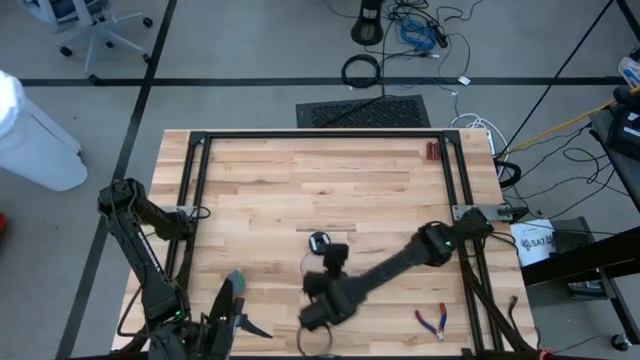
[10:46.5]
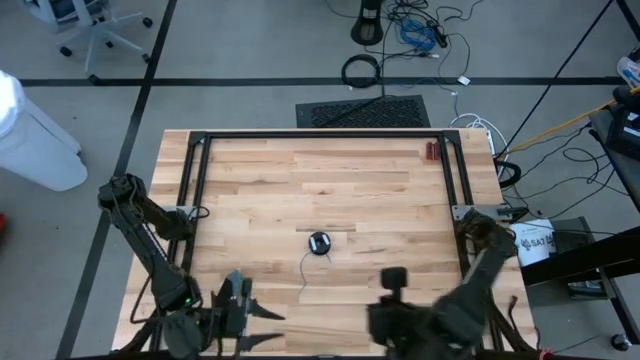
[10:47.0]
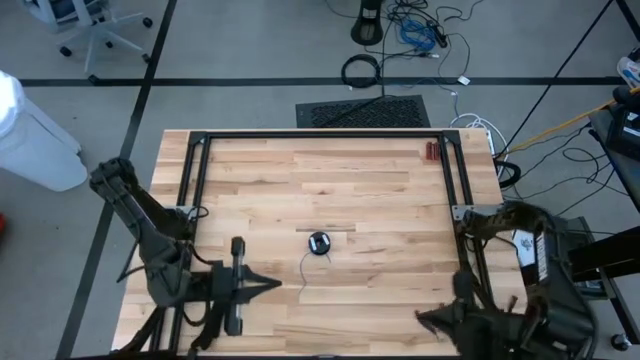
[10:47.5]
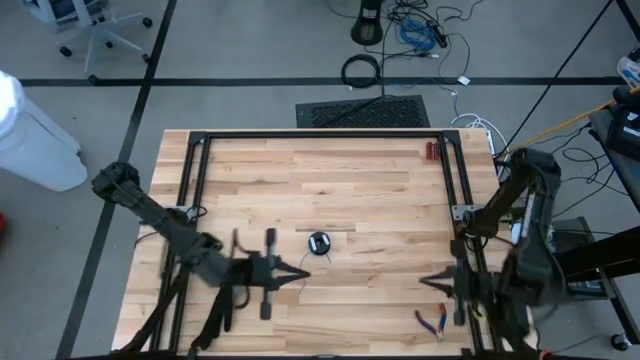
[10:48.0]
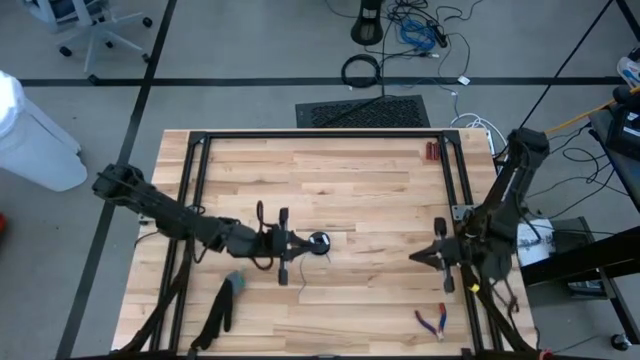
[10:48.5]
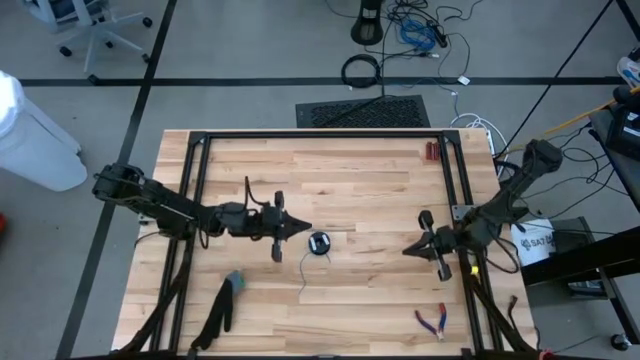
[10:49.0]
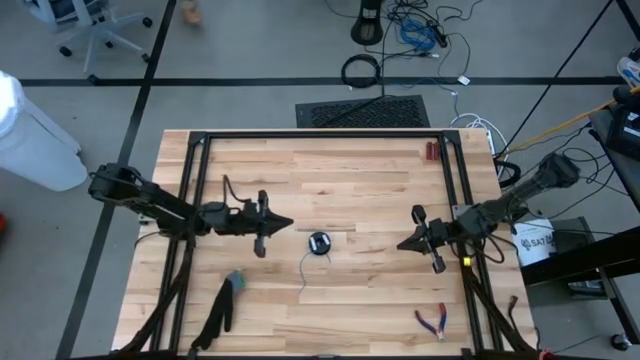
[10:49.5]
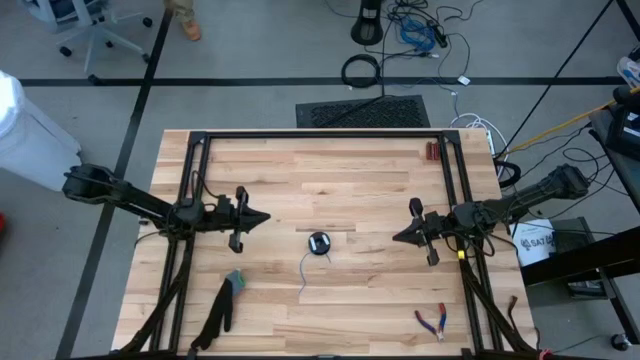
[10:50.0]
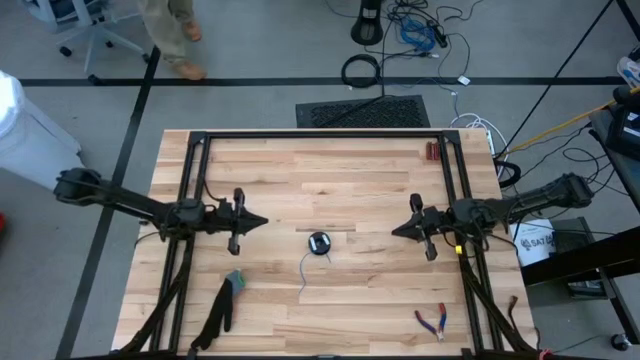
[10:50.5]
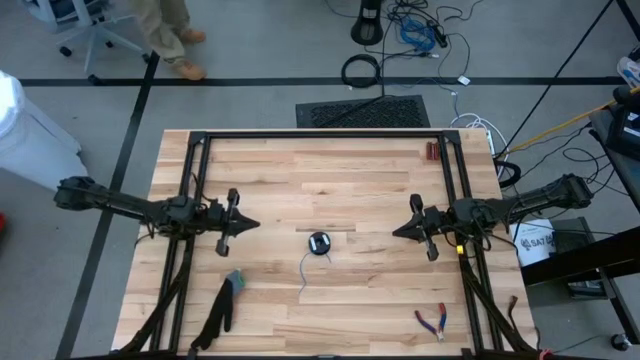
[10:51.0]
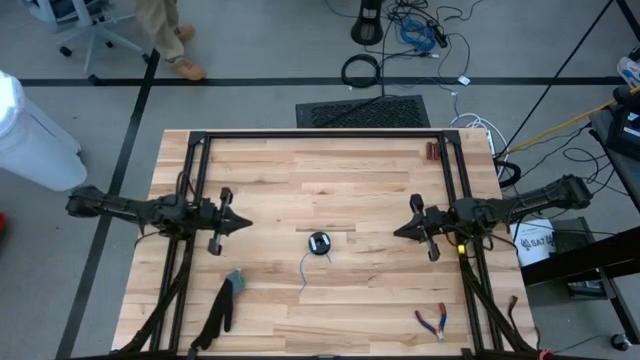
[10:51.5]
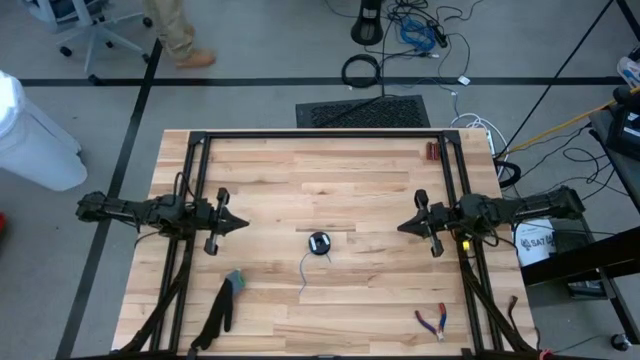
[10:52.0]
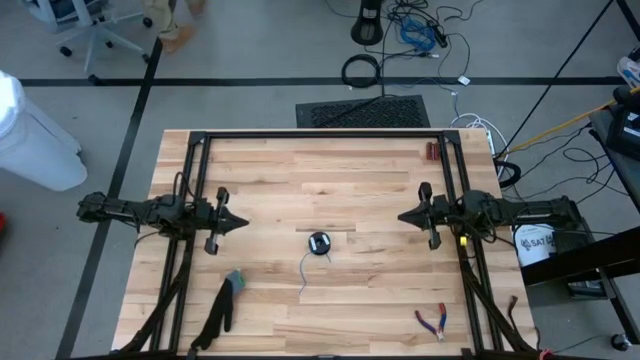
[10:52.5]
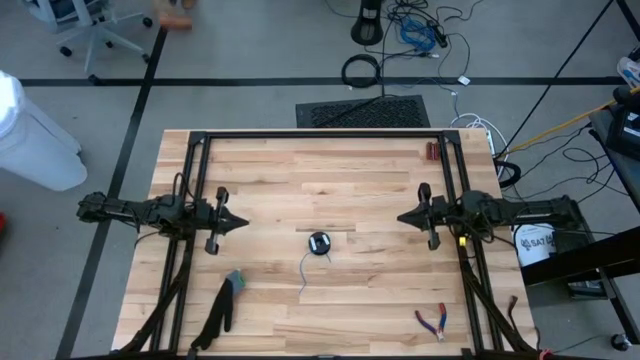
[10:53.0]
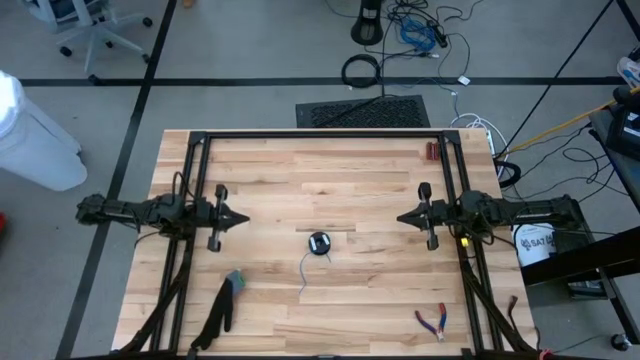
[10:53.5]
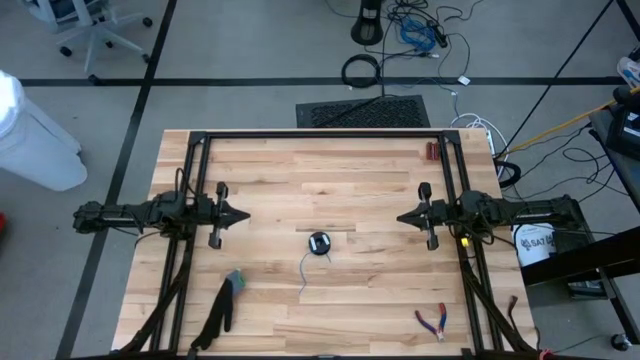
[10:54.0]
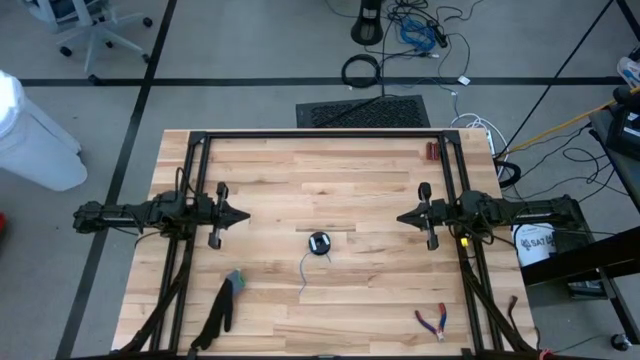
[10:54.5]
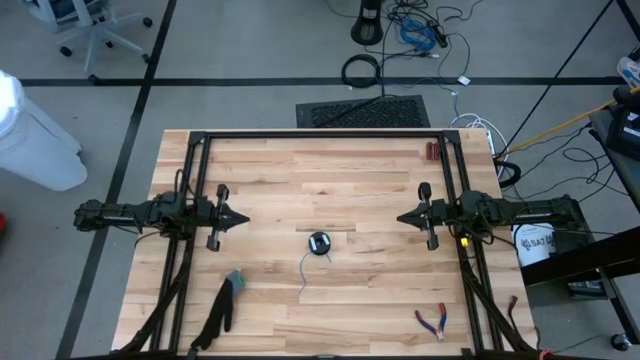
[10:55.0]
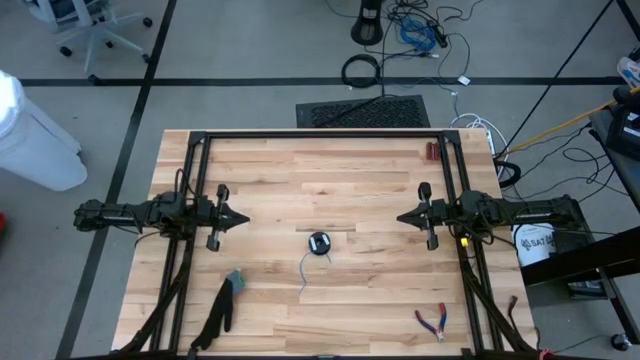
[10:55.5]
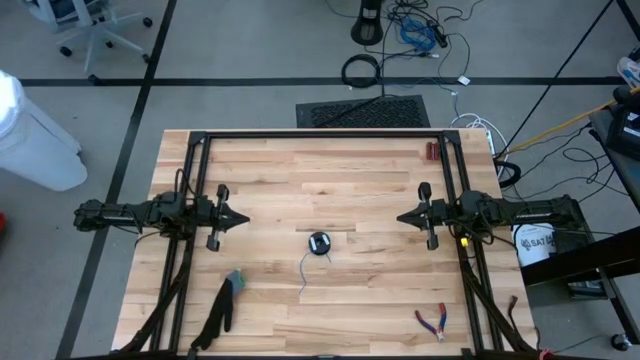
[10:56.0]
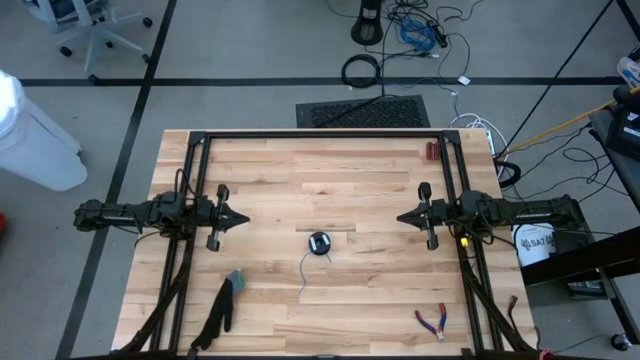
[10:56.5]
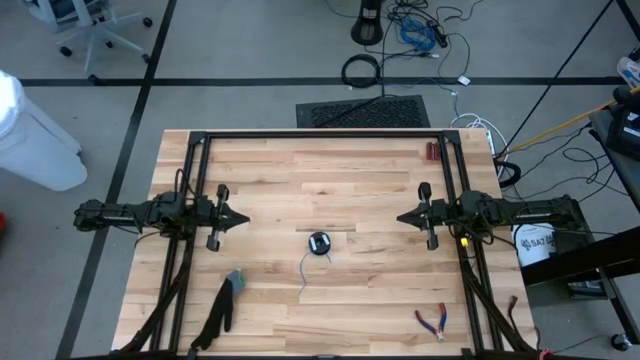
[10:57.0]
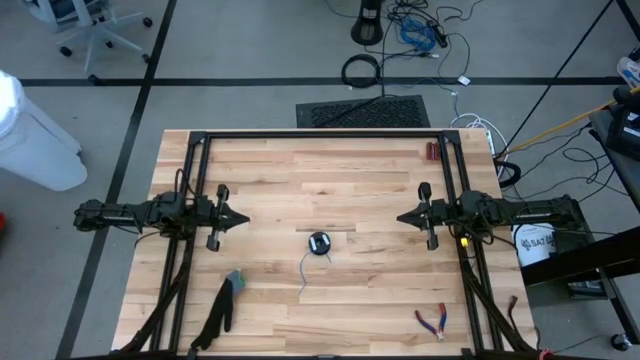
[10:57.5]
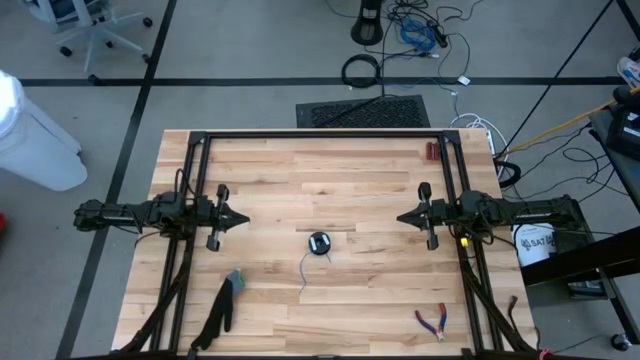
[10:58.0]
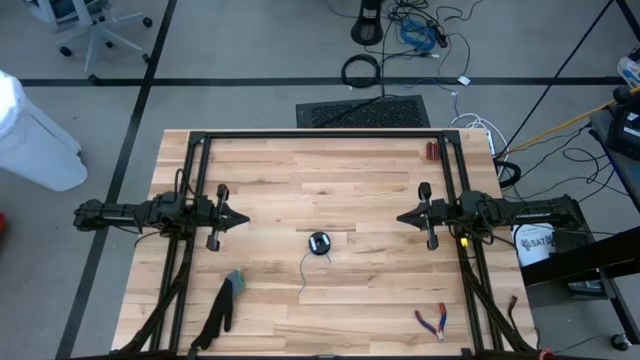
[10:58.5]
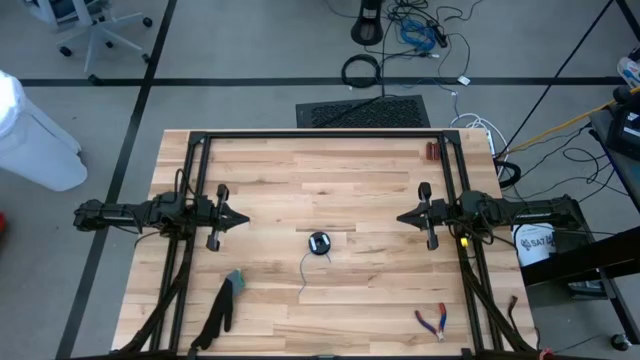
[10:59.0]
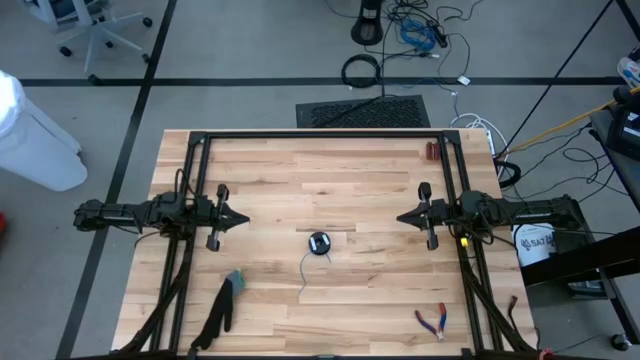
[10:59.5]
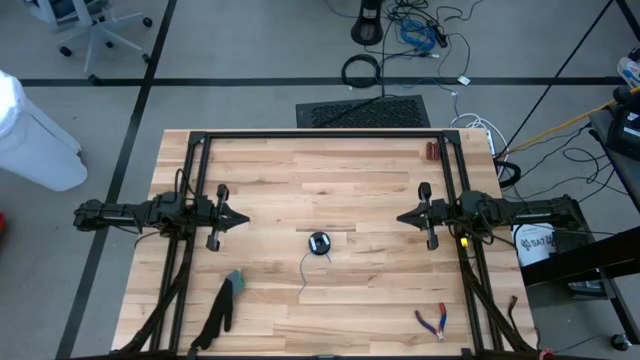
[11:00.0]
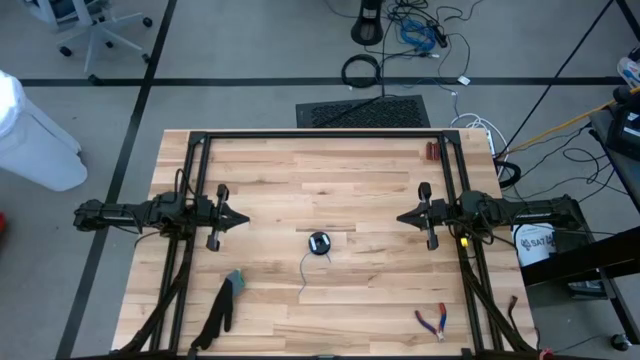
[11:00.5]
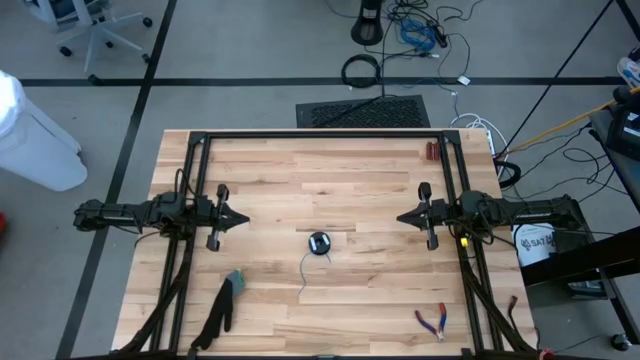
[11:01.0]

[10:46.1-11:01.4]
Task: Coil cords
Return to home position

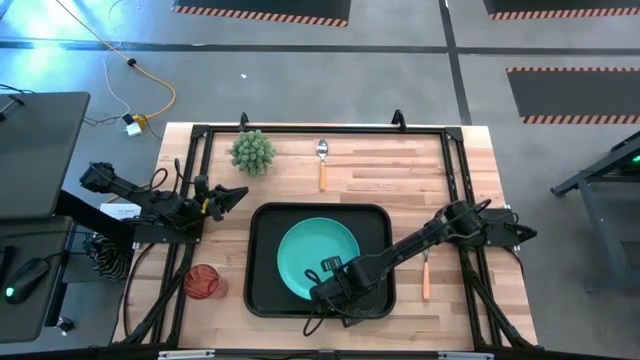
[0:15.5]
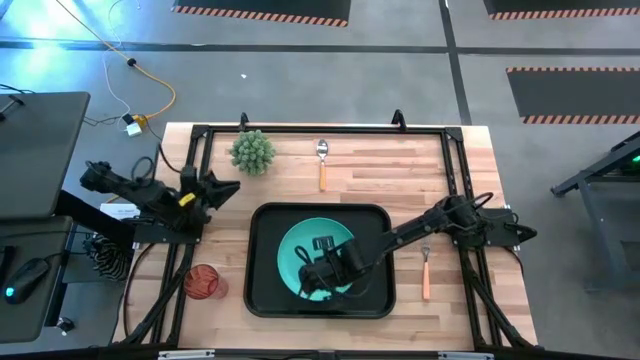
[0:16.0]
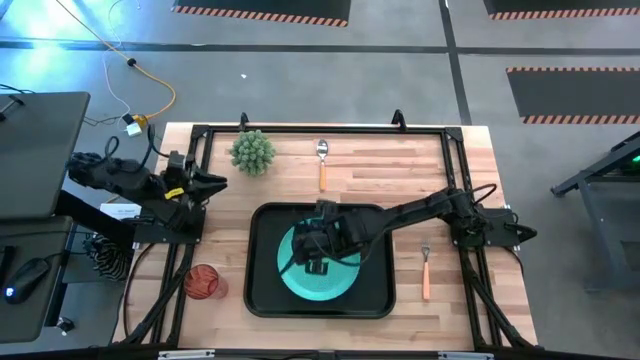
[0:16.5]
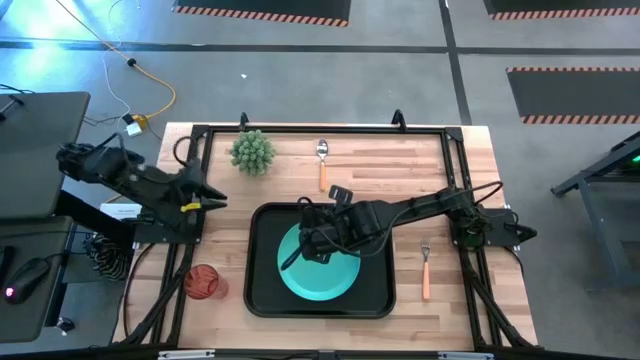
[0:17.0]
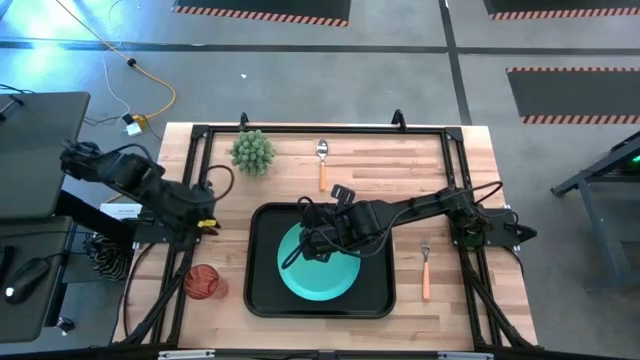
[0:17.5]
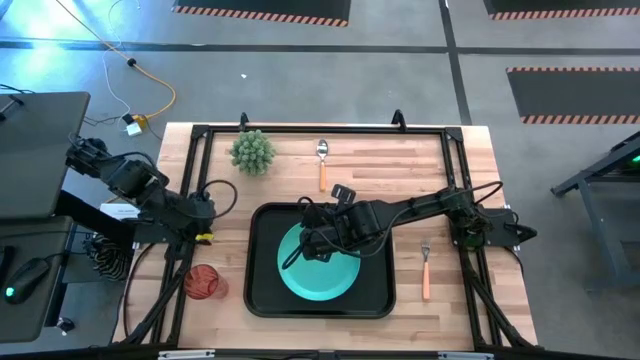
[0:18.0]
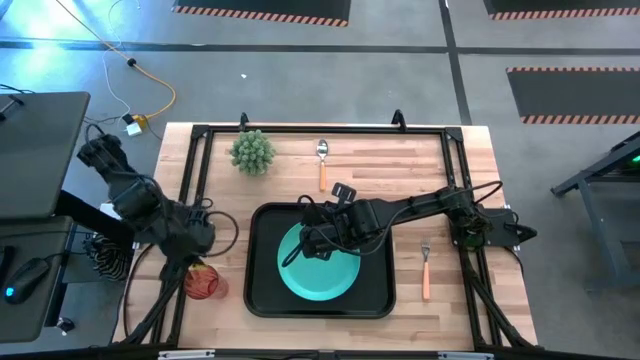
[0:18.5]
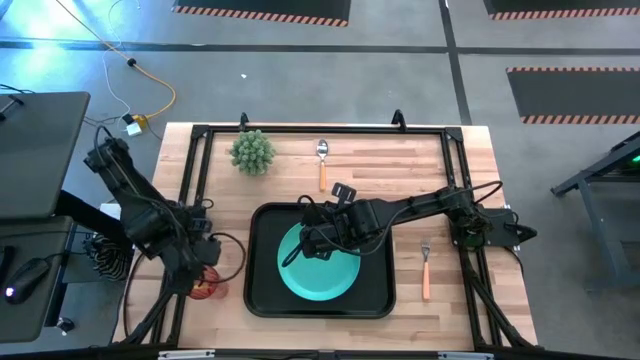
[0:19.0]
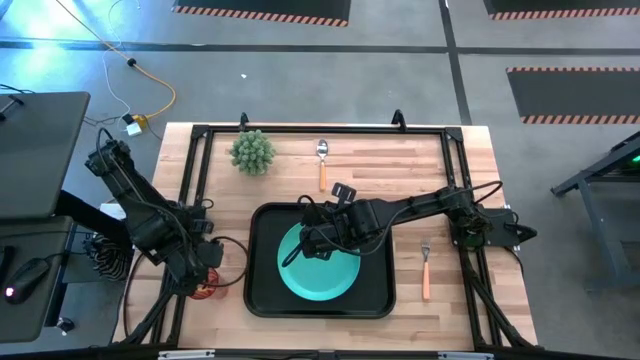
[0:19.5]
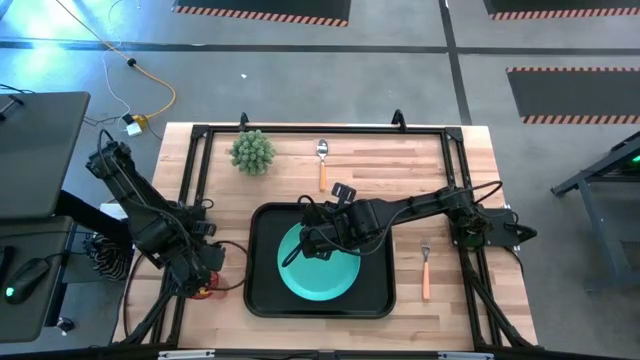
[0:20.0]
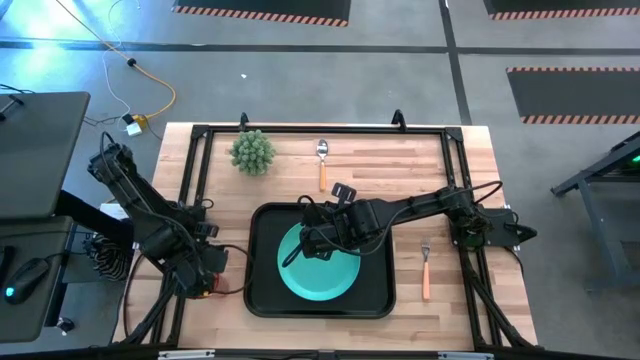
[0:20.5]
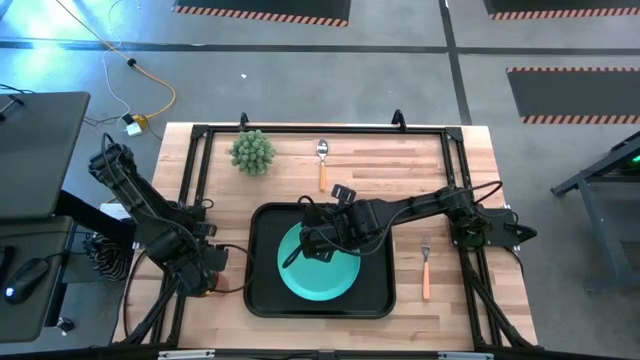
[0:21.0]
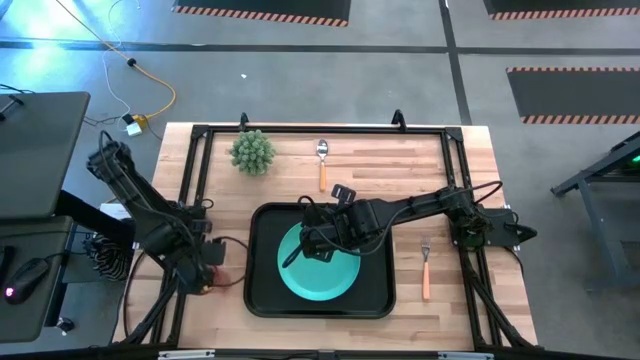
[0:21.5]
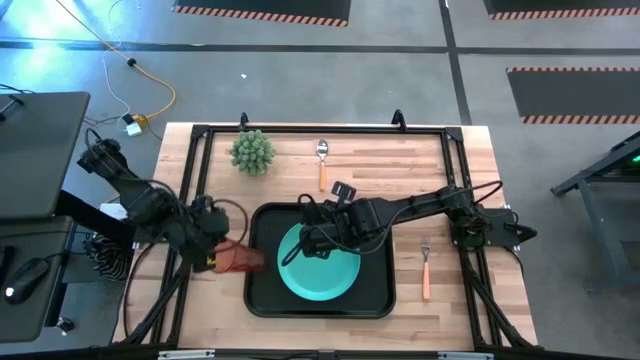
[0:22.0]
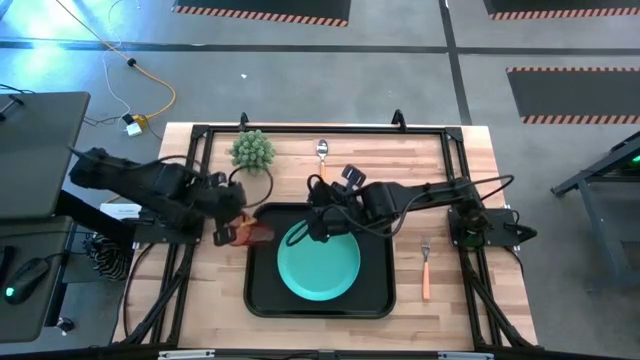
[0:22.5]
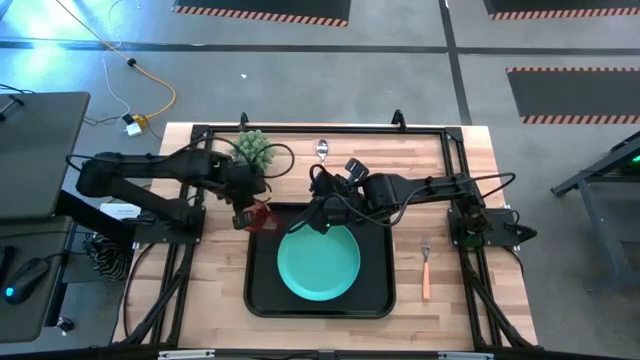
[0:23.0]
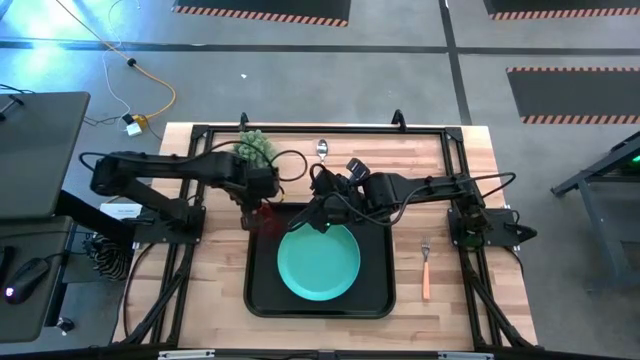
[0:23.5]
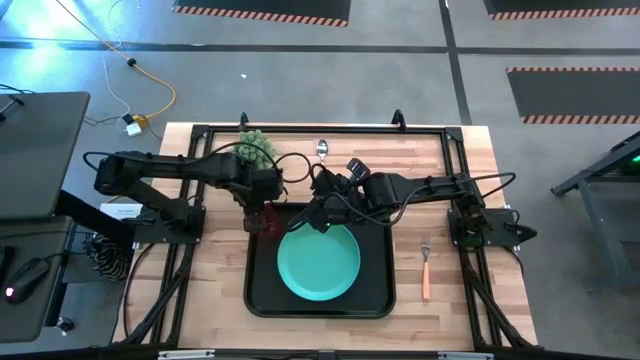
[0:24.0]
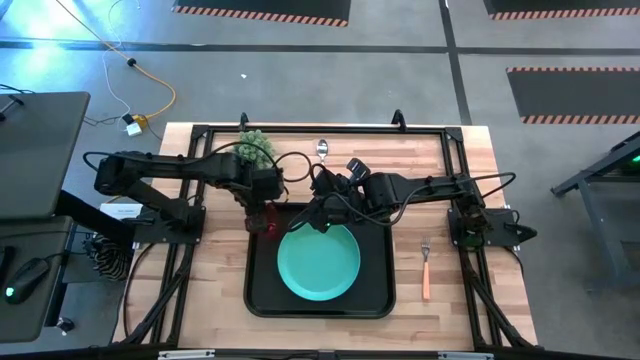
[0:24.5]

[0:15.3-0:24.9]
Task: Pick and place plate/cup/fork/spoon on tray
Put the orange glass on the top left of the blue plate on the black tray
